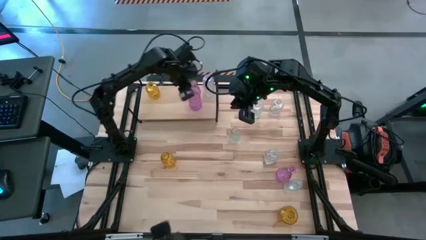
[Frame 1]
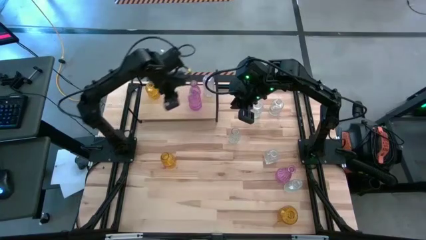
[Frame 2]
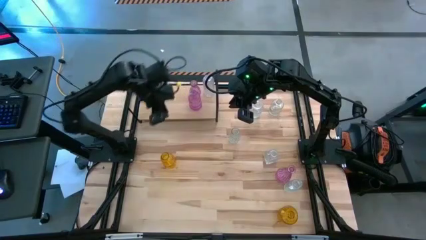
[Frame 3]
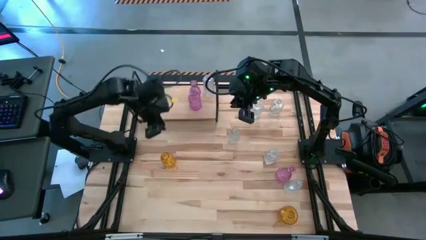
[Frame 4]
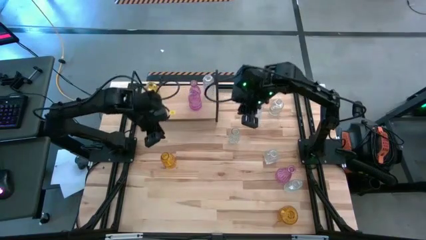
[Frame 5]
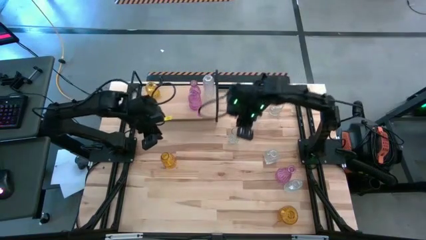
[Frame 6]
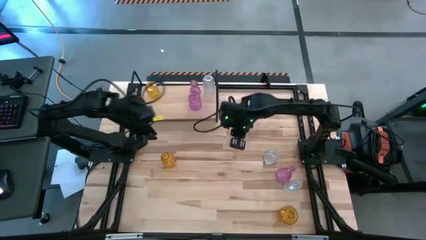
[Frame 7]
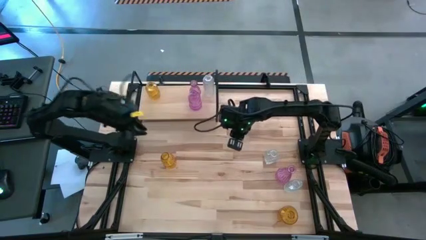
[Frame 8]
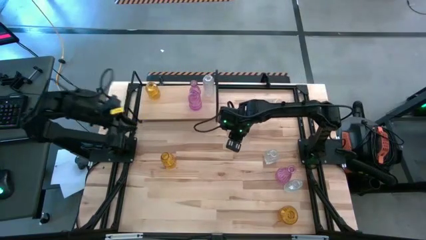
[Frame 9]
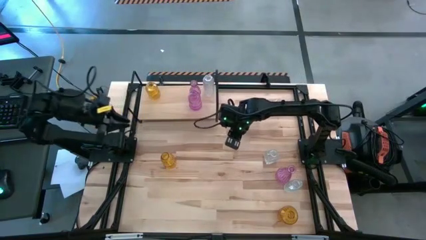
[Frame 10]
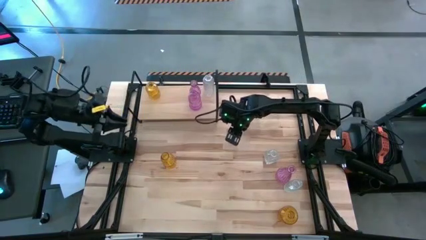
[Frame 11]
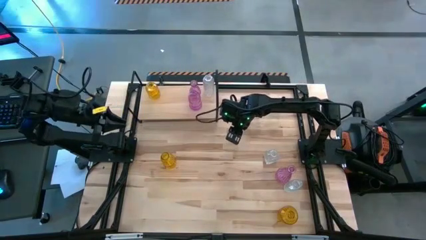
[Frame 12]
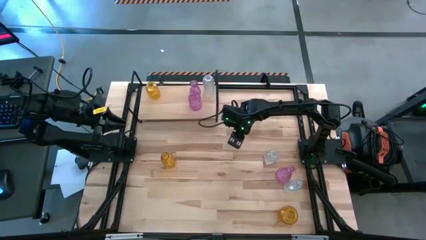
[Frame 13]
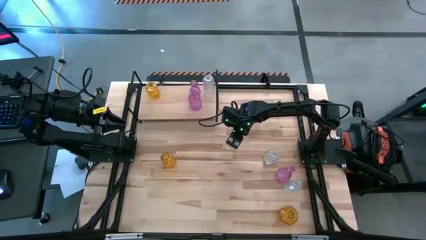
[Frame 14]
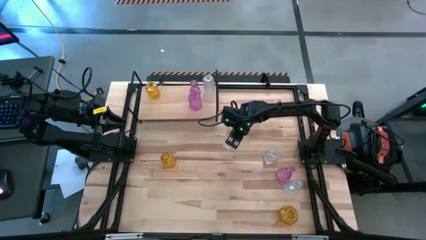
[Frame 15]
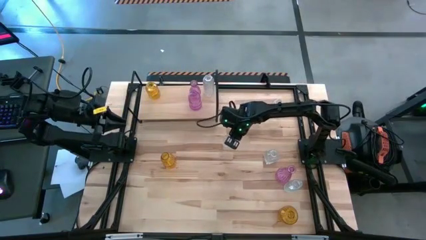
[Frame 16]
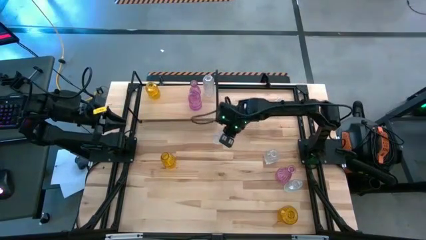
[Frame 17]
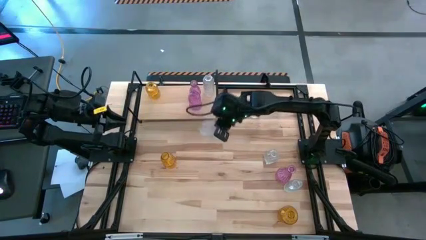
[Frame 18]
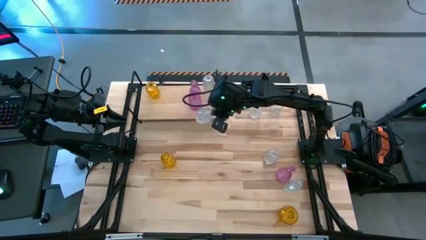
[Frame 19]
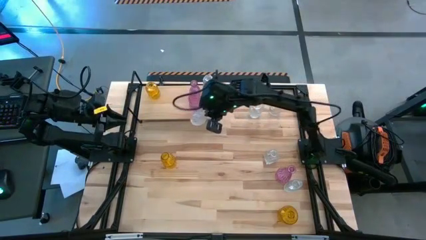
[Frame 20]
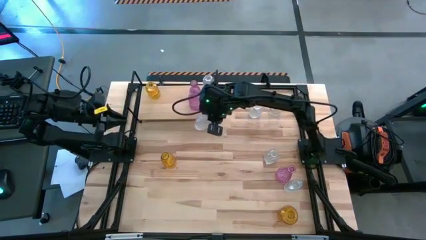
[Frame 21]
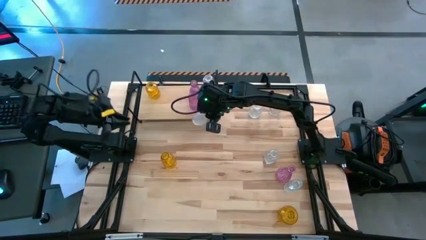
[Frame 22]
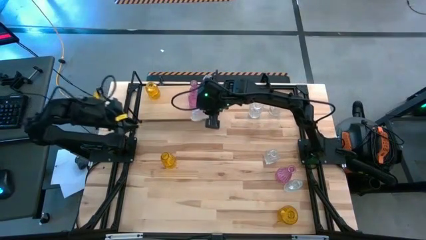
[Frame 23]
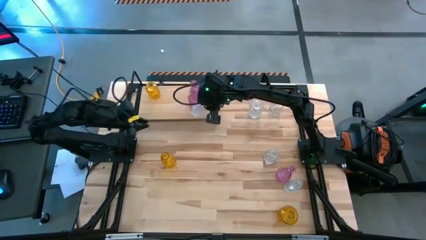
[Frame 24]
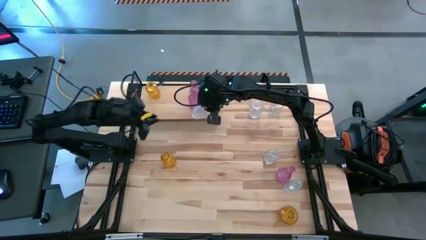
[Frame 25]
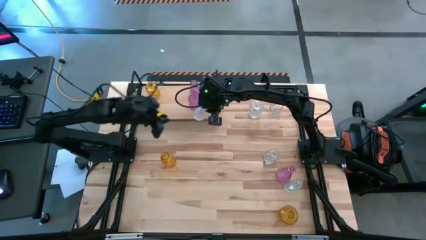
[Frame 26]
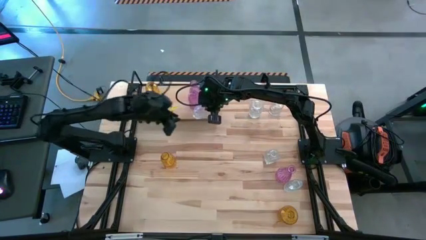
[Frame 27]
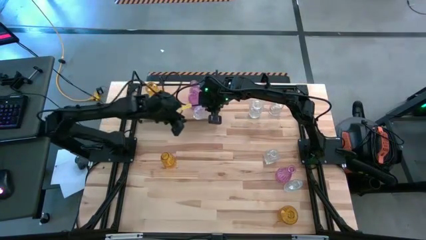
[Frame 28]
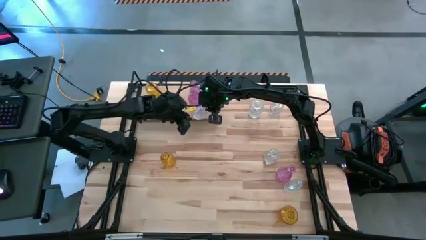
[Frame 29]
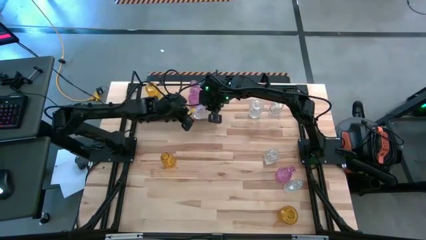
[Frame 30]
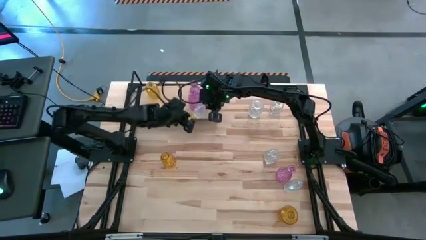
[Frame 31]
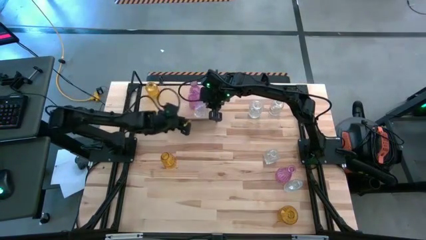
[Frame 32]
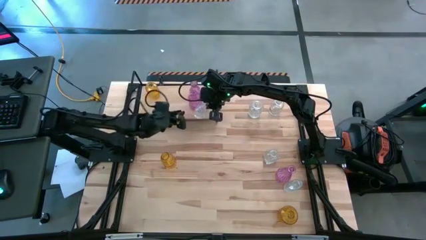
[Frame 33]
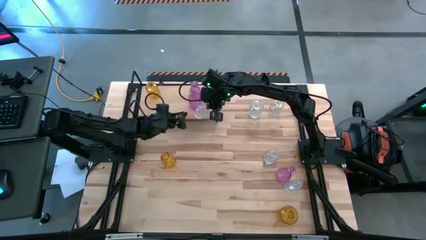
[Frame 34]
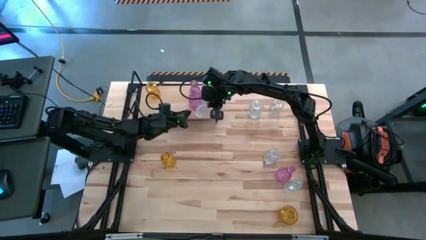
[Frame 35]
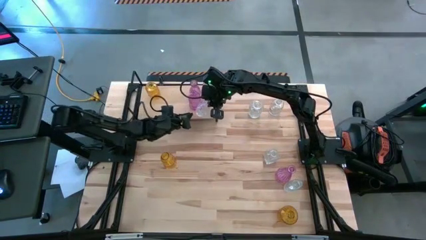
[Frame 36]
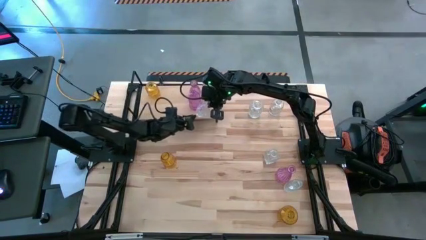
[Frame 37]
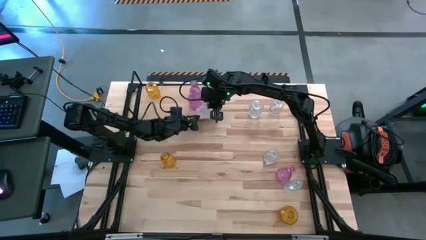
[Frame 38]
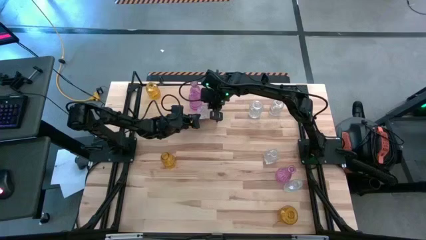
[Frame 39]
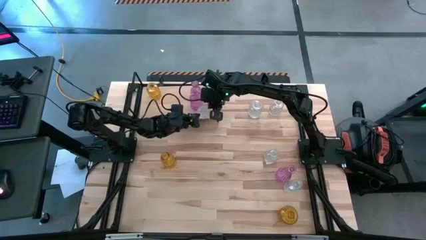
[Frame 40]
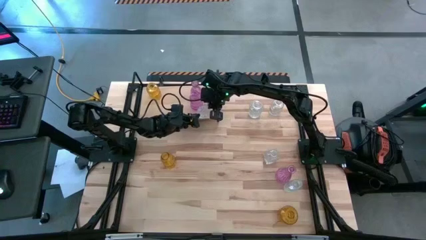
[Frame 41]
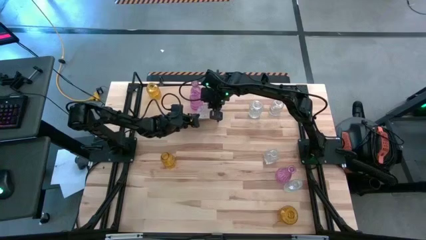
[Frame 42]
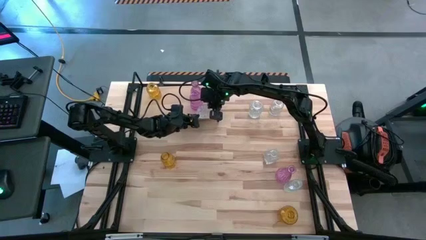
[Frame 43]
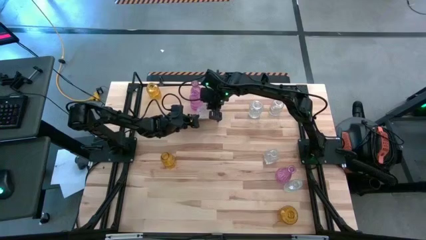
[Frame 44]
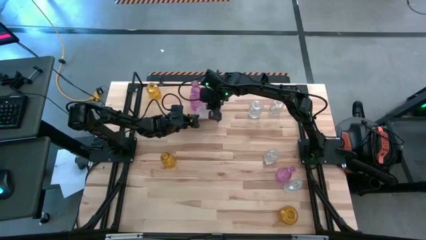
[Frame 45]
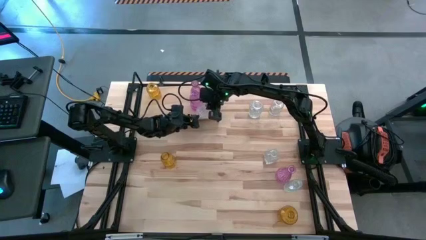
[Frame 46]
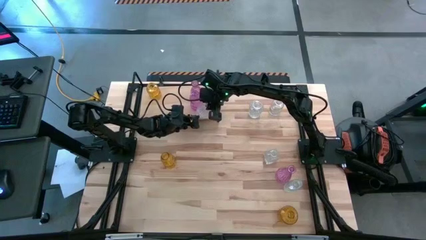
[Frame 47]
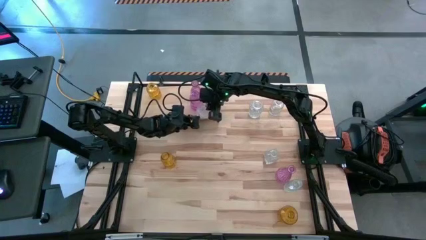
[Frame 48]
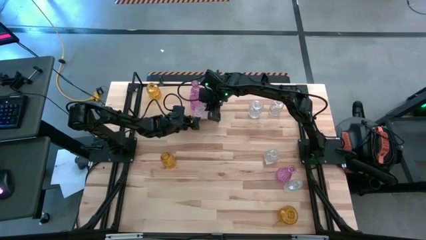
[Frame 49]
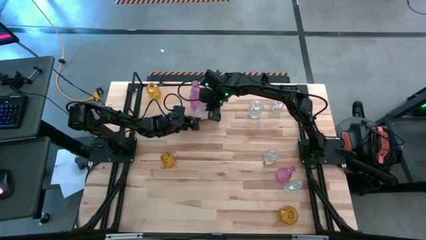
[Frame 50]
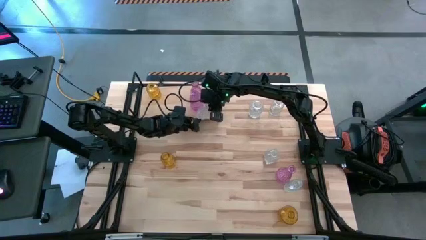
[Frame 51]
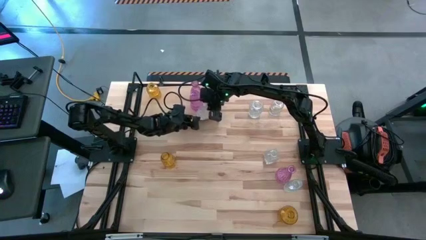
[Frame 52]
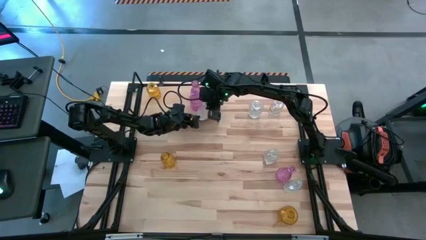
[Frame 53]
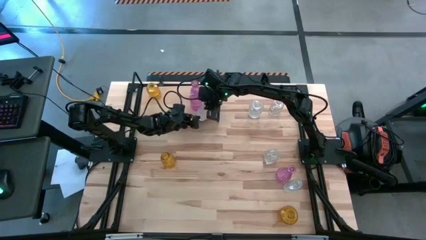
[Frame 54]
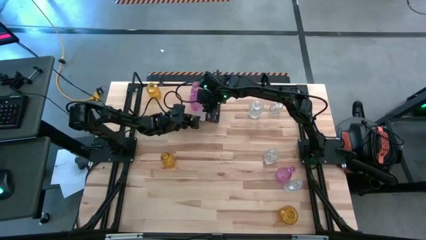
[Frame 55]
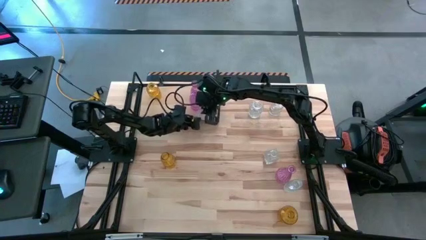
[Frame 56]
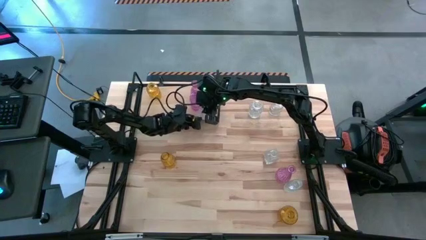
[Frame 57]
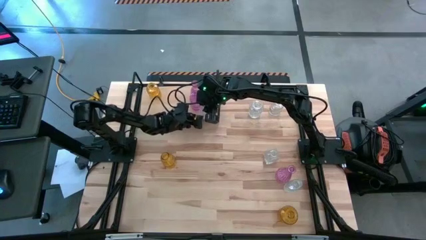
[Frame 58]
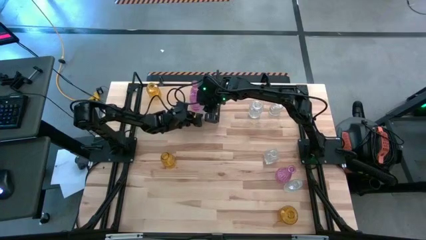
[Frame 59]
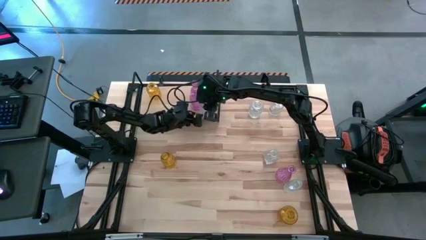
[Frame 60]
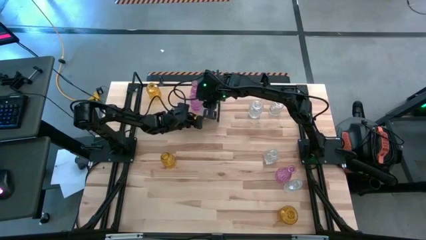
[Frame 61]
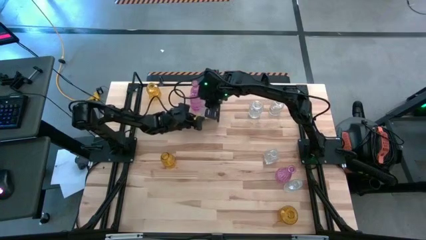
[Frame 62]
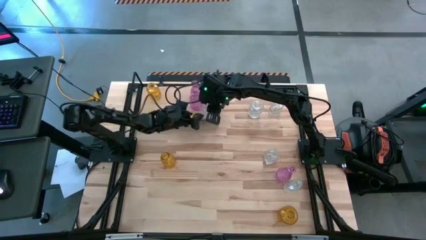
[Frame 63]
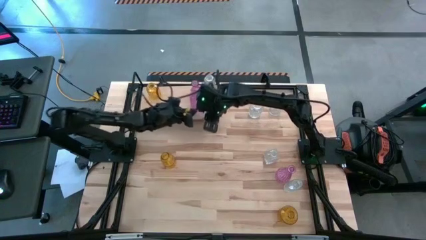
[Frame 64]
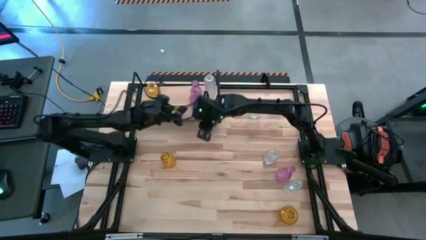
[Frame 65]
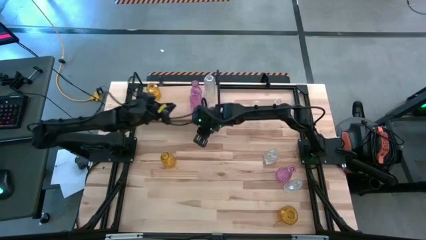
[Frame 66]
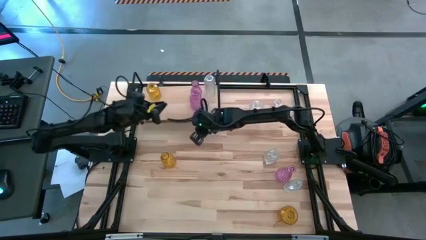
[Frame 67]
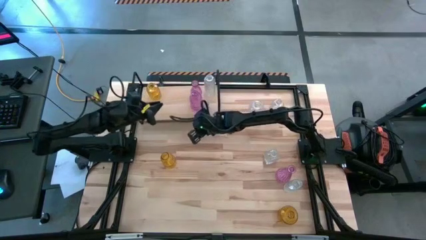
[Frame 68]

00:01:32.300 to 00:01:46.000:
Task: sort vases onto shelf
Put the transparent vase on the shelf aligned with the other transparent vase

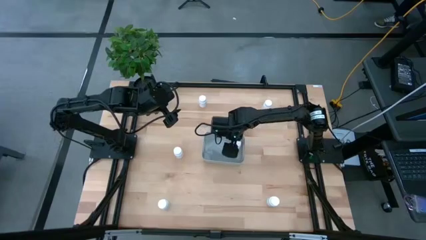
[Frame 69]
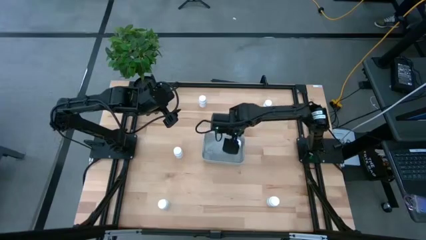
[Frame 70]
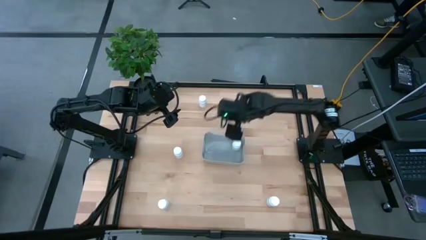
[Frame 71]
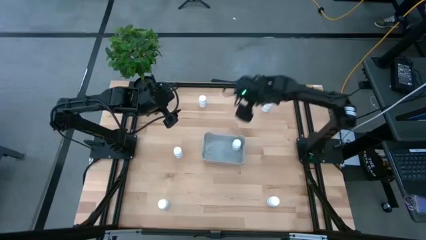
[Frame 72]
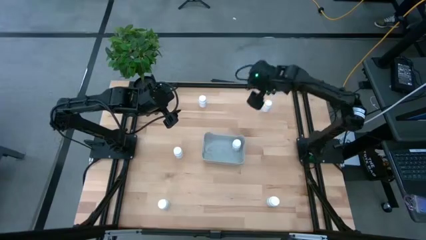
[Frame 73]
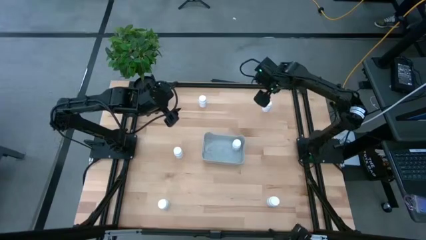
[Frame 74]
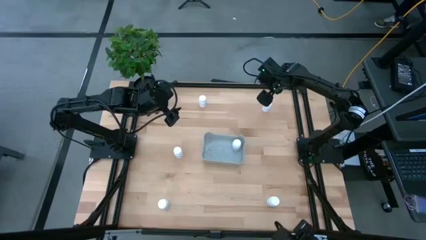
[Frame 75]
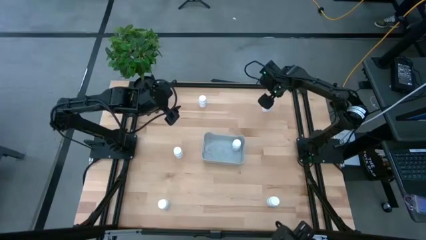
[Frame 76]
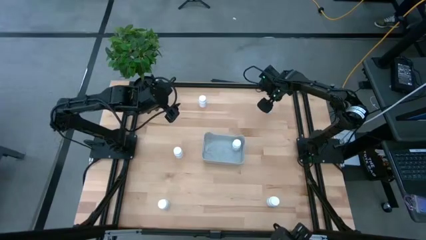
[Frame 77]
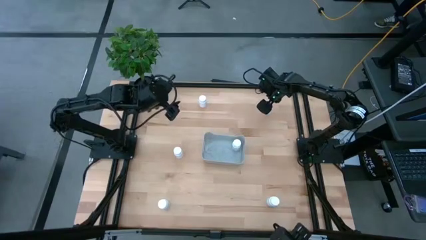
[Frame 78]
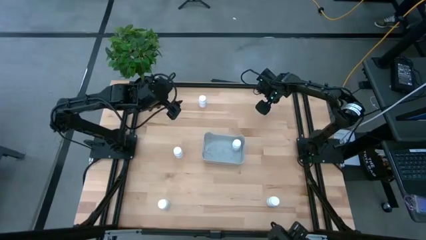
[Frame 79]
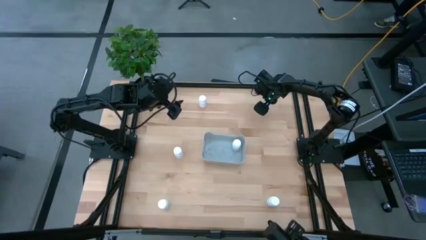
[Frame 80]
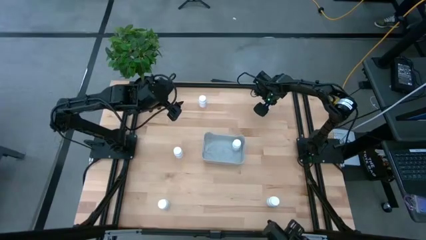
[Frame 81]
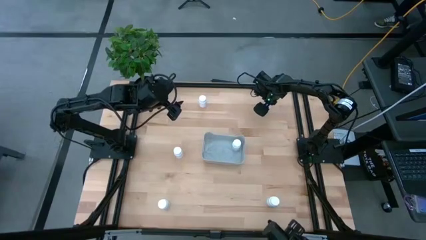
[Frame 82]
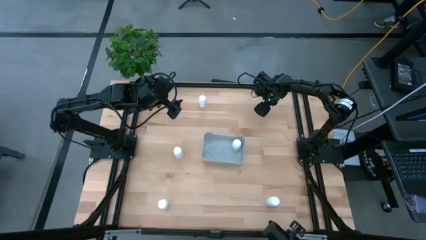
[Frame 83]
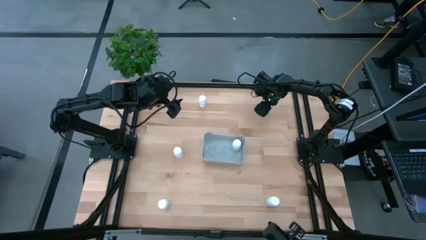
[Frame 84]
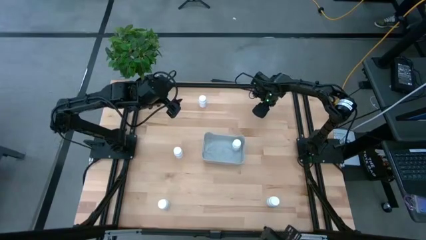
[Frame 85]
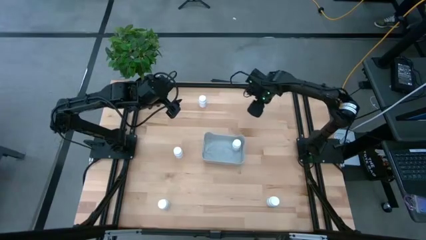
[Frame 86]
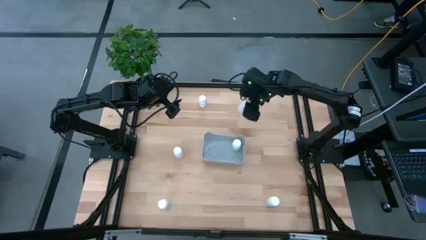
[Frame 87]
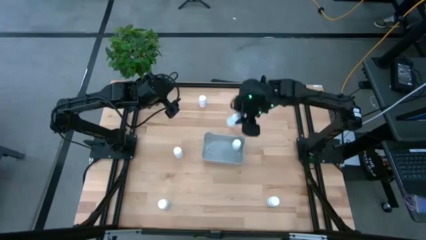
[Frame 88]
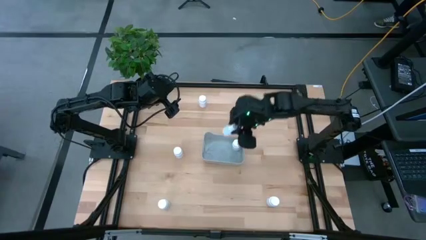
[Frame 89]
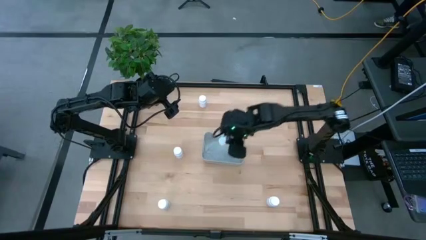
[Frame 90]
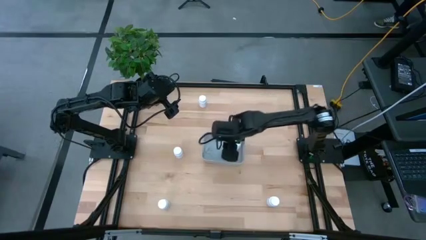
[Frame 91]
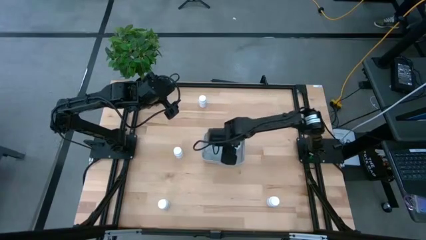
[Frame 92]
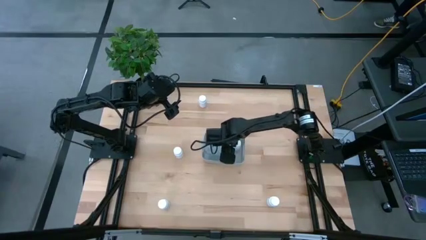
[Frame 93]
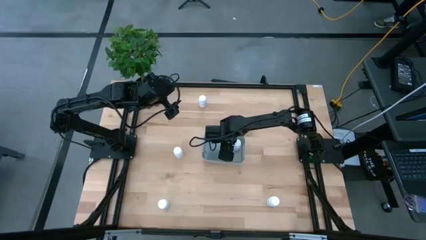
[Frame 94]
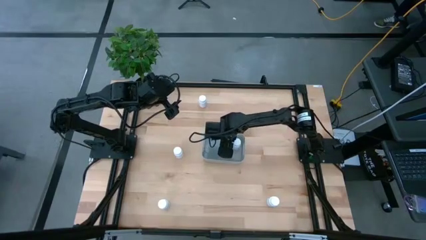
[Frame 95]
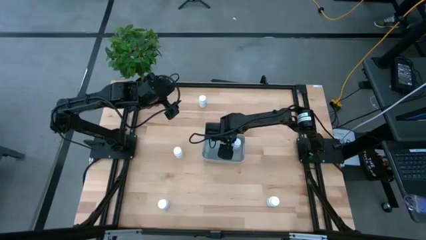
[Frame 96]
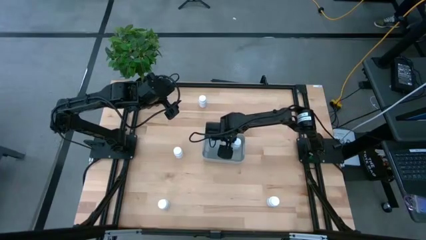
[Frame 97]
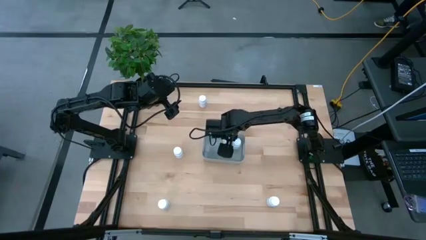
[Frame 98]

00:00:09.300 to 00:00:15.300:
Task: Pick and place pill bottles into a basket
Put the white pill bottle into the gray bin
